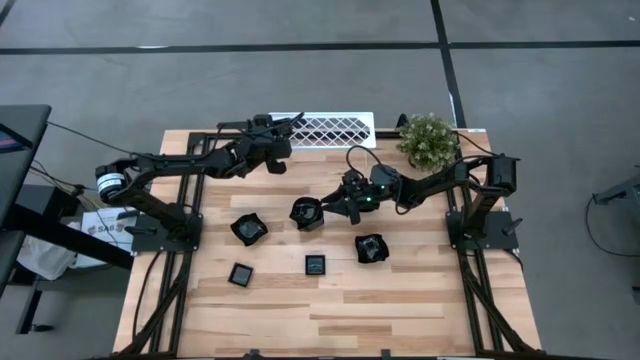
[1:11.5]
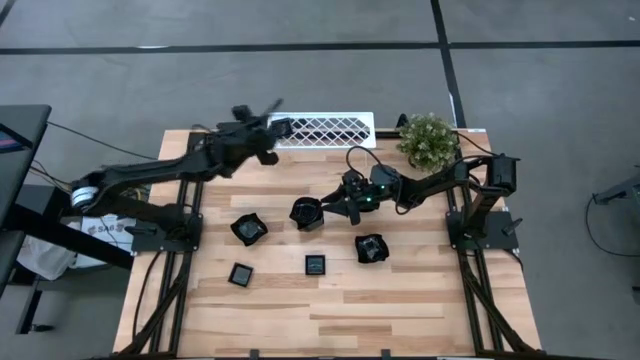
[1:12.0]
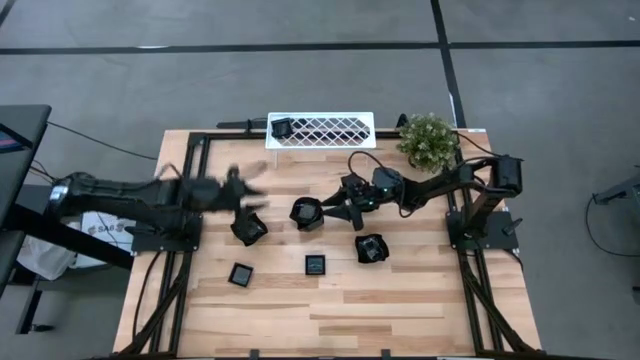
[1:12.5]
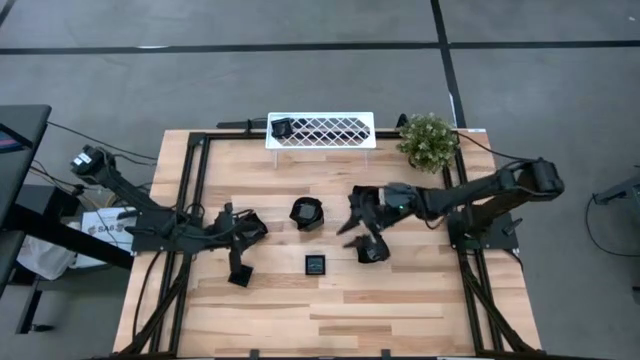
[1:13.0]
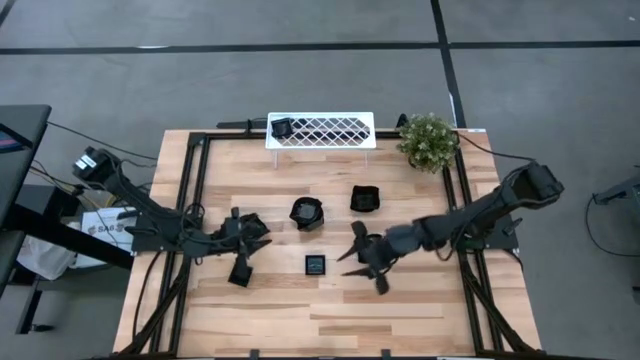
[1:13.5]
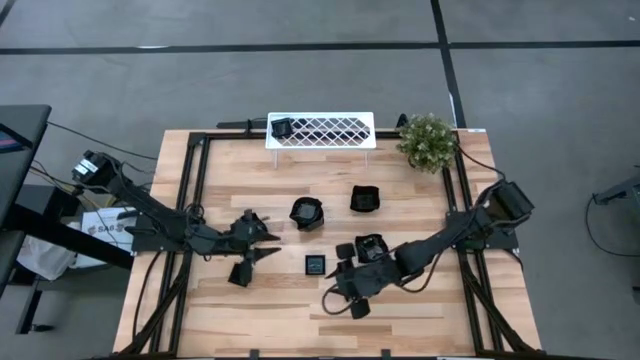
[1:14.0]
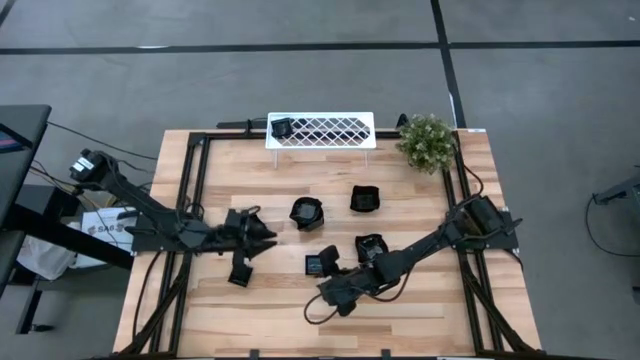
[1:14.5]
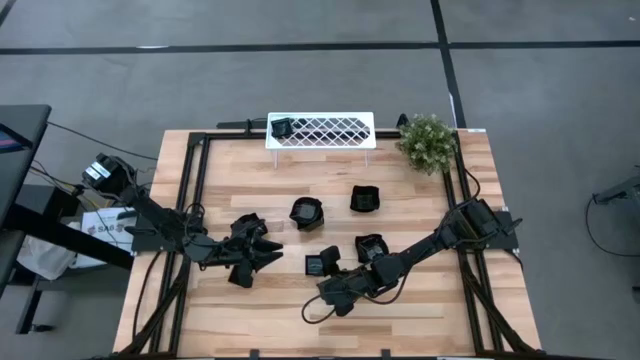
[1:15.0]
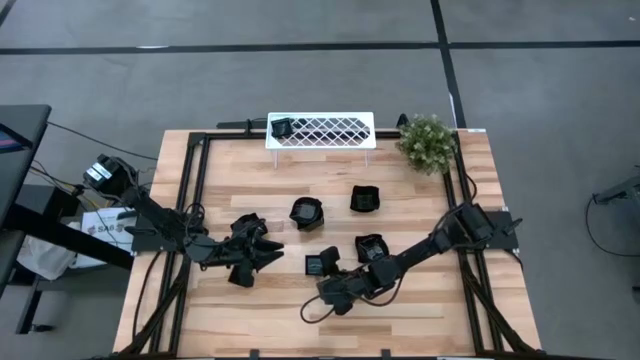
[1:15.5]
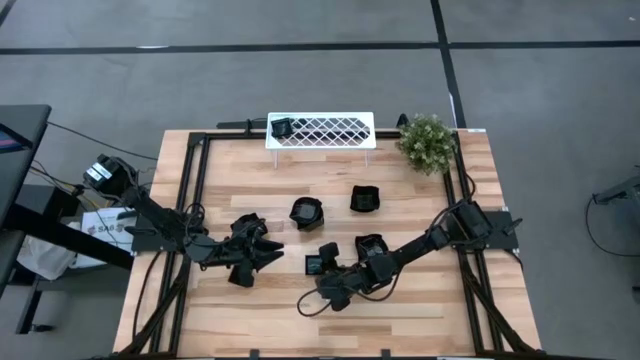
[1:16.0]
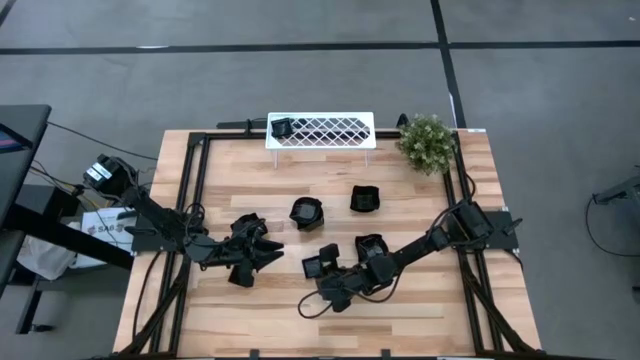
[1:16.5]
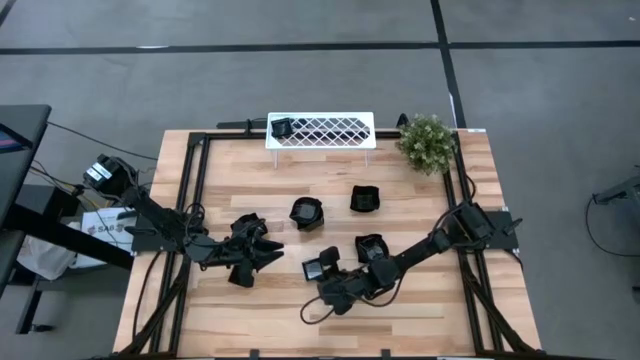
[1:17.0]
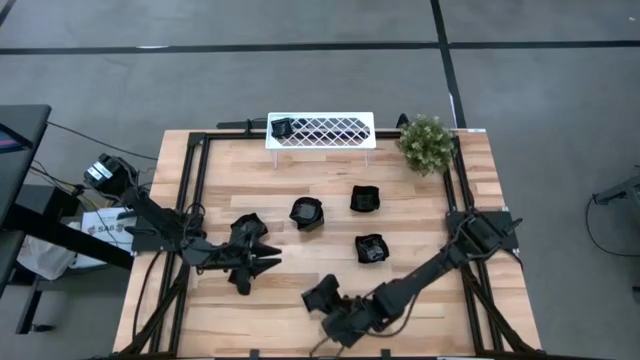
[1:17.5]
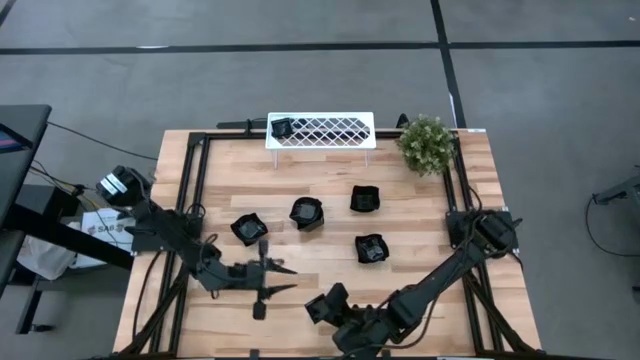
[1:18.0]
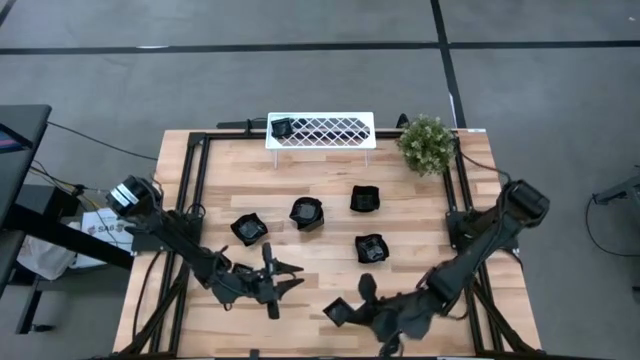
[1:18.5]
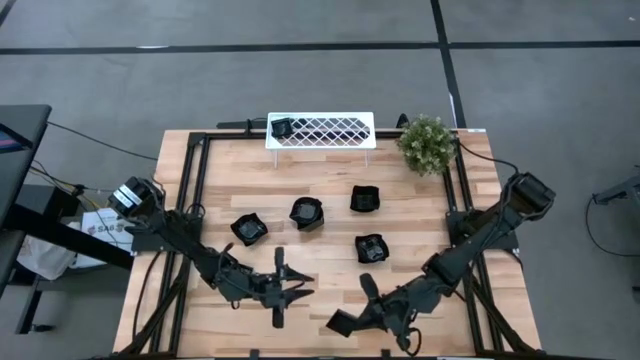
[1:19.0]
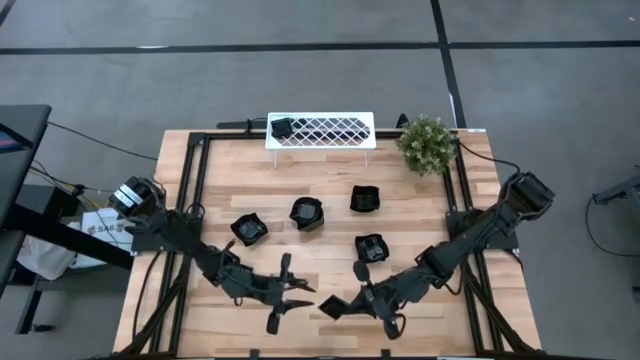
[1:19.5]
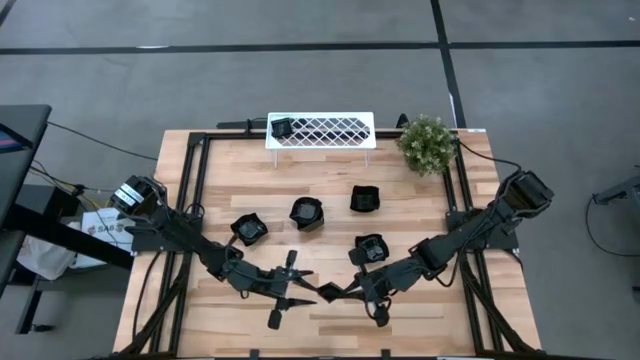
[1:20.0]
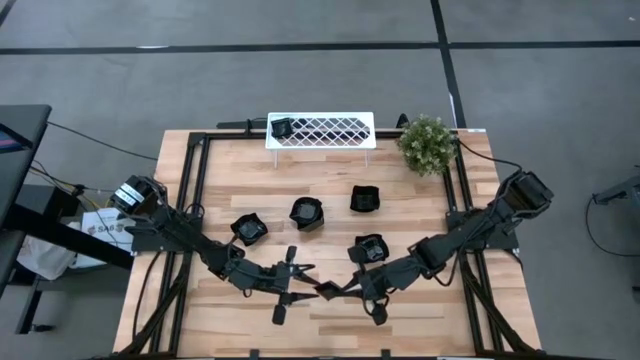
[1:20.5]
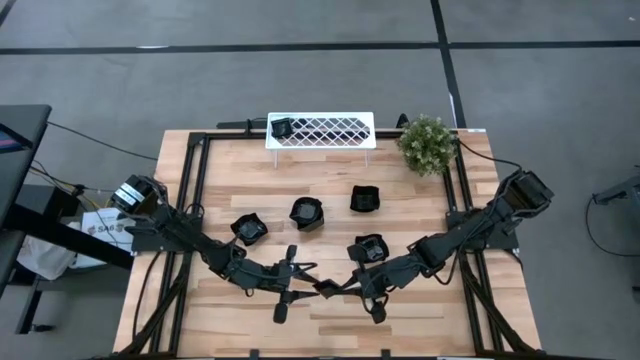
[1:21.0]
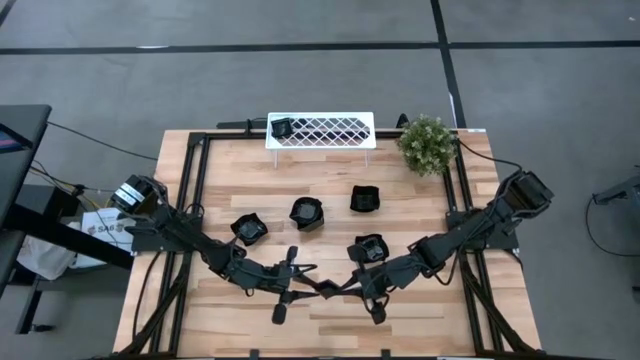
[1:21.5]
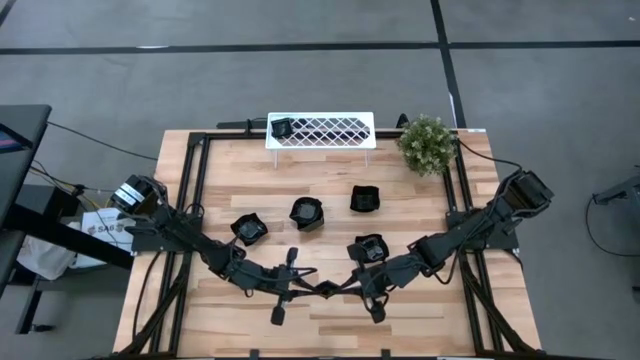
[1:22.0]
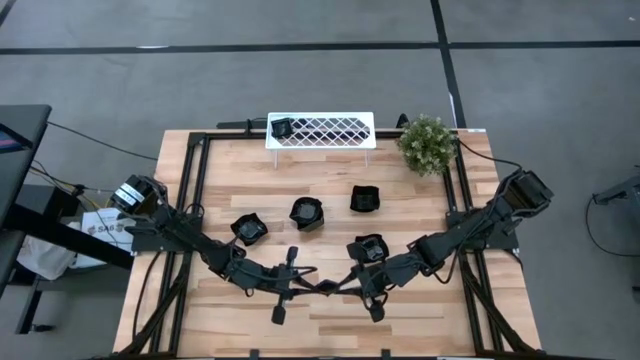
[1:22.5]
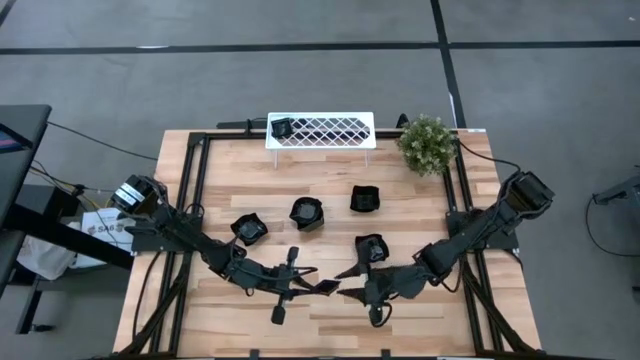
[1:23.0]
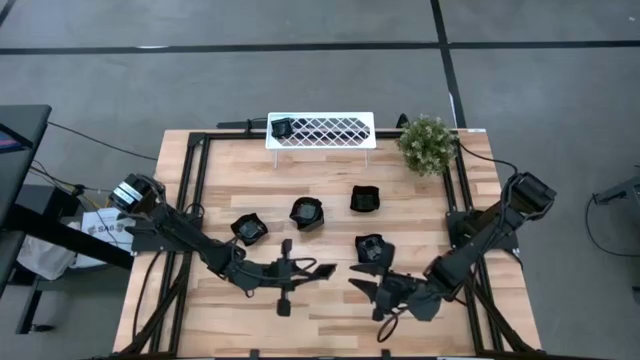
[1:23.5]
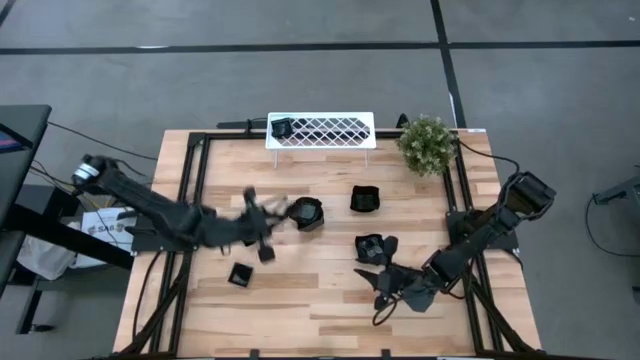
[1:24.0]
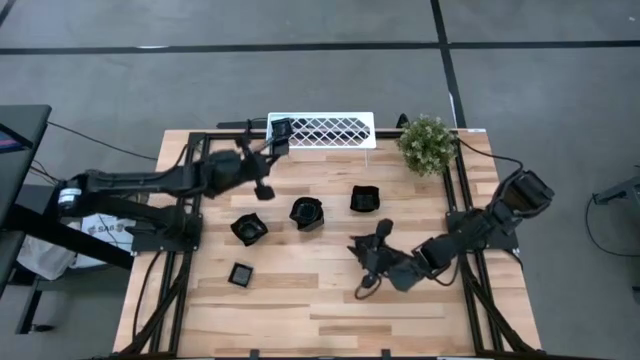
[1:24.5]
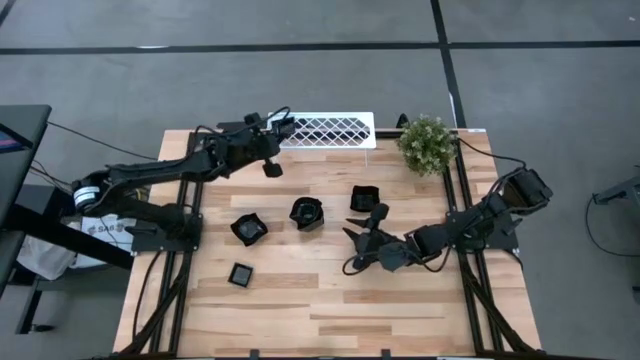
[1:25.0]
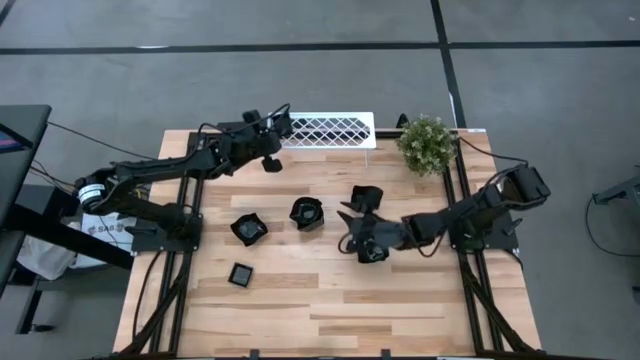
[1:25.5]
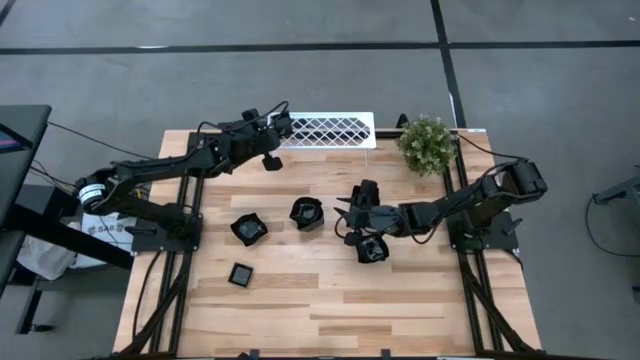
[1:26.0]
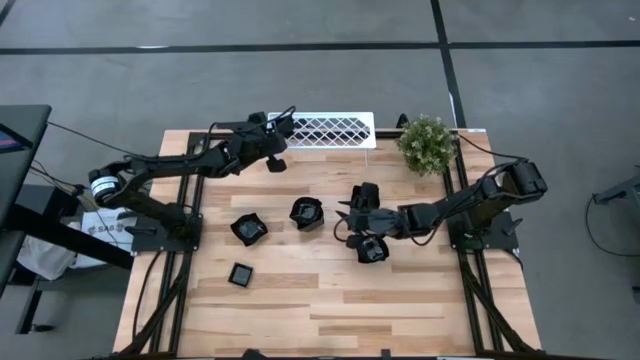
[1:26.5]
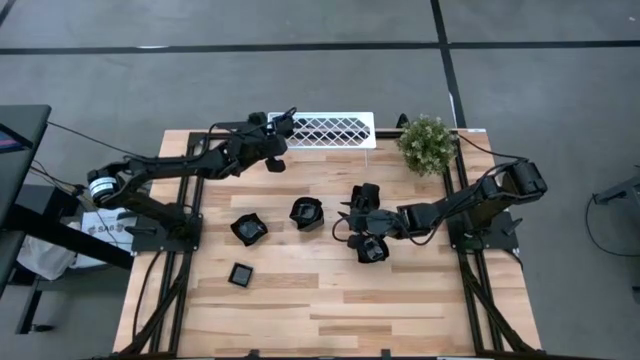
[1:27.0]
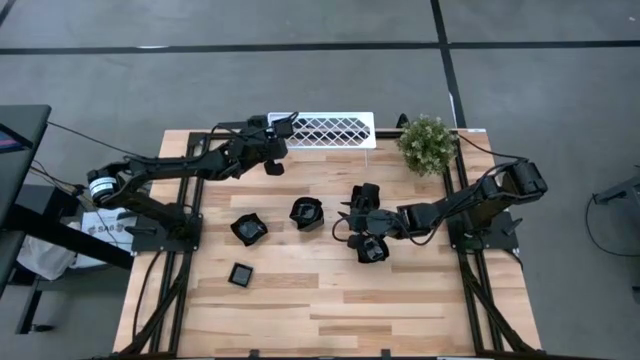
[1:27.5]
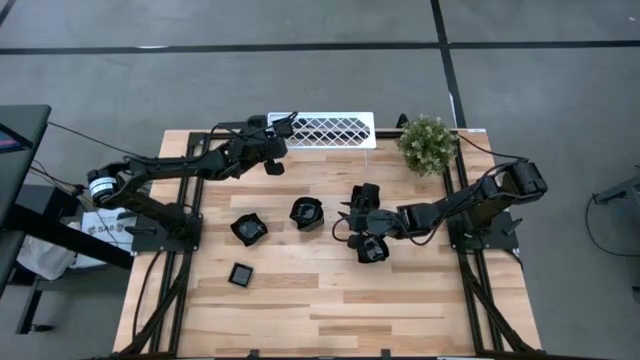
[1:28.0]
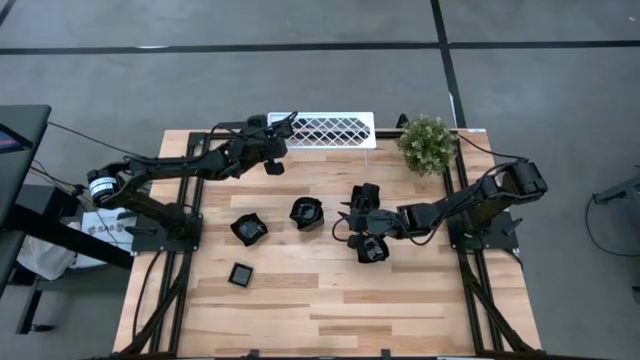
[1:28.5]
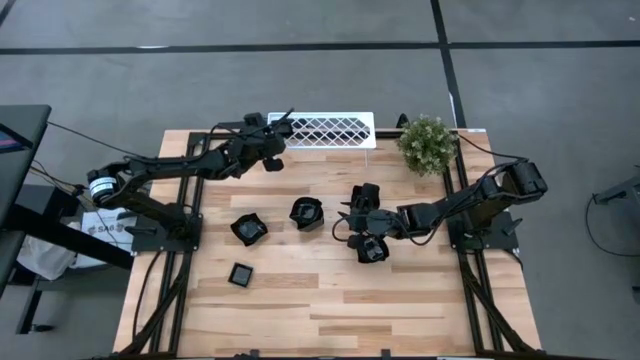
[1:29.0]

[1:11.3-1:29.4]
Task: Pick & Place Mini shaped plates
Stack the right black square plate on top of the black square plate on the shelf

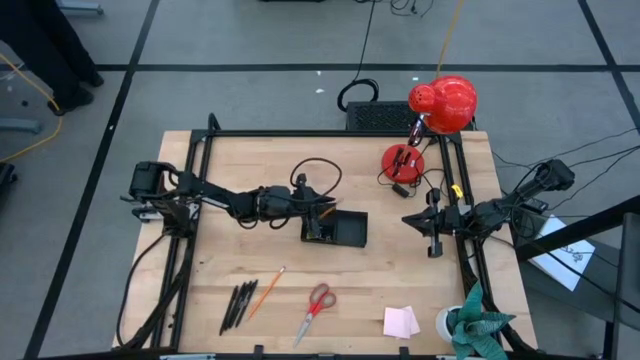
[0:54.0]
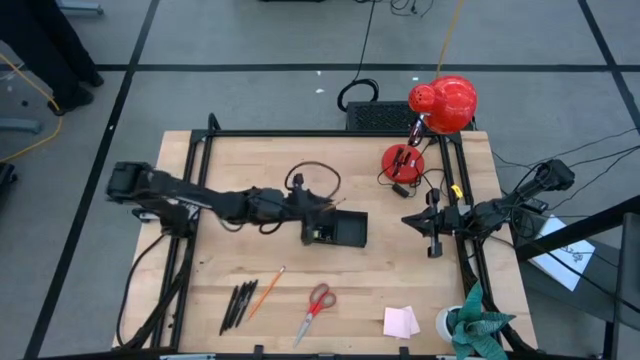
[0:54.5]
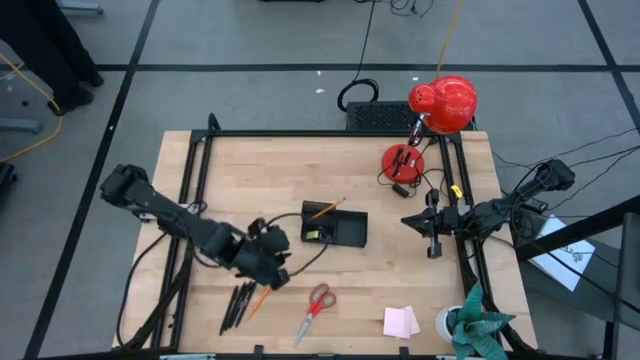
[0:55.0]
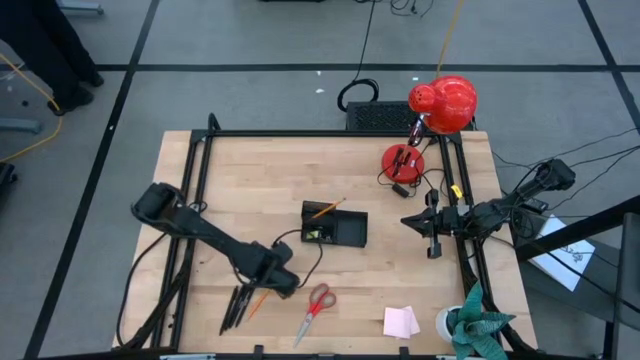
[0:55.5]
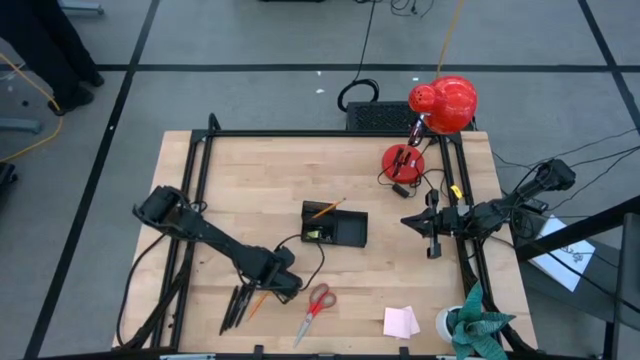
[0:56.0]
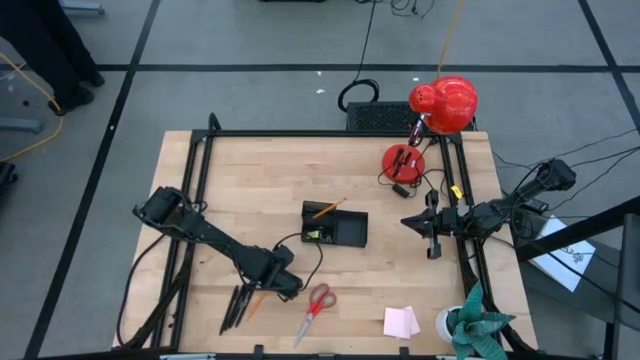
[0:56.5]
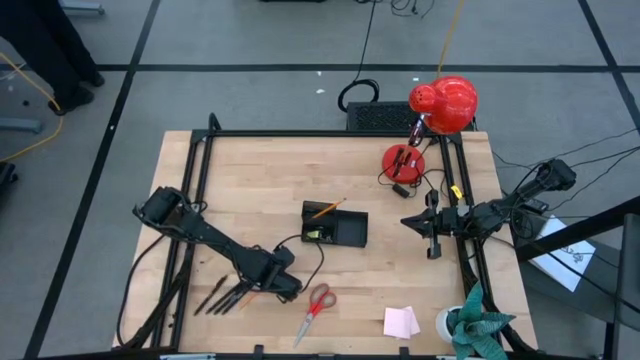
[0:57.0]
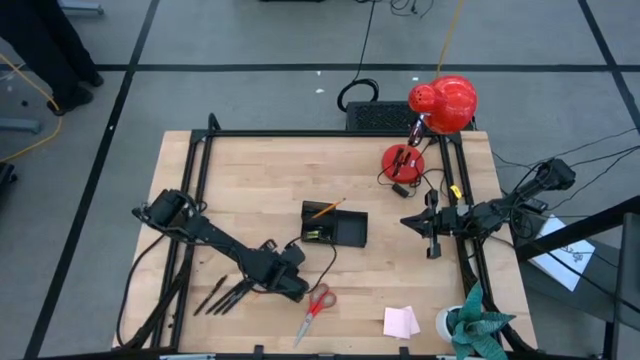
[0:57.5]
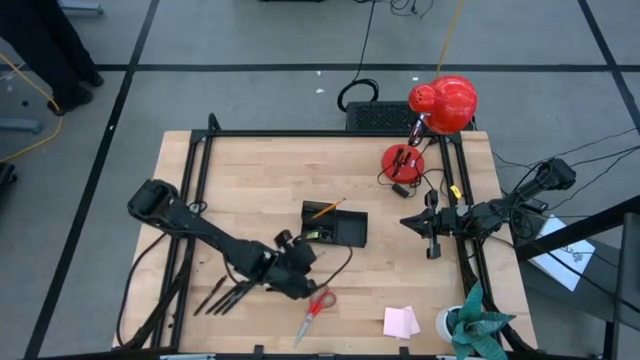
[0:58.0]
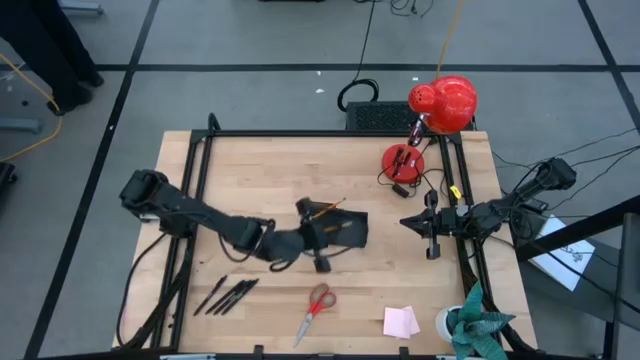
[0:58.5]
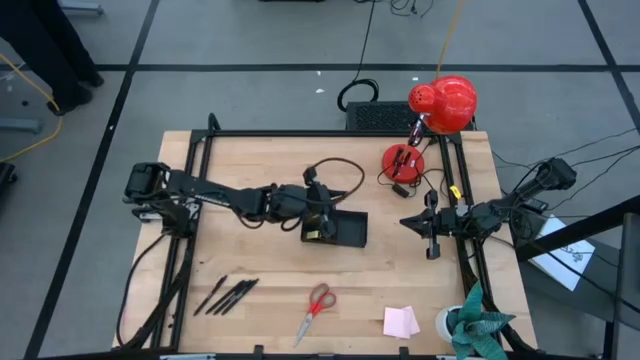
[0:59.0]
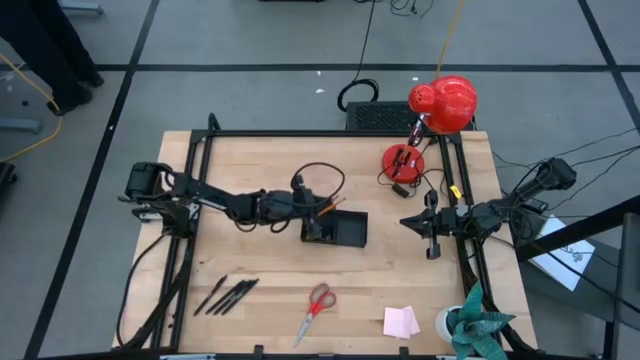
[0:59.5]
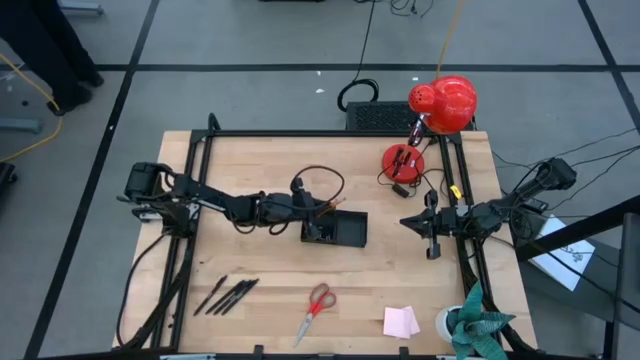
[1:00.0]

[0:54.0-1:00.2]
Task: Pick and place office supplies into organizer
Put the pencil into the desk organizer
